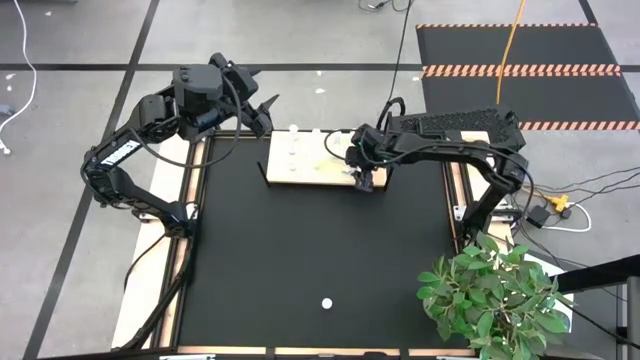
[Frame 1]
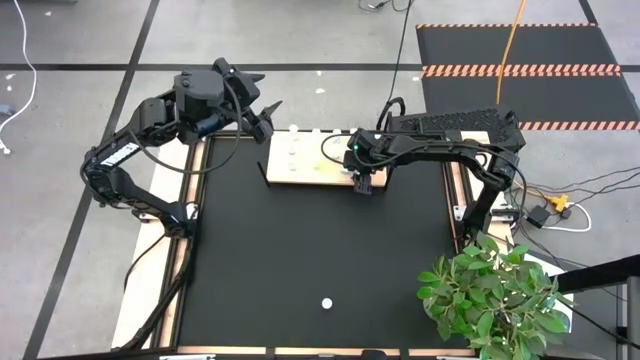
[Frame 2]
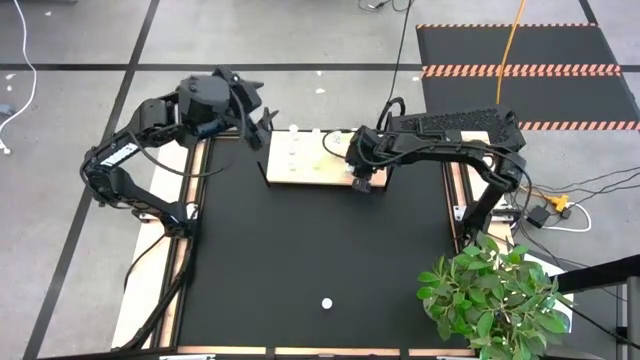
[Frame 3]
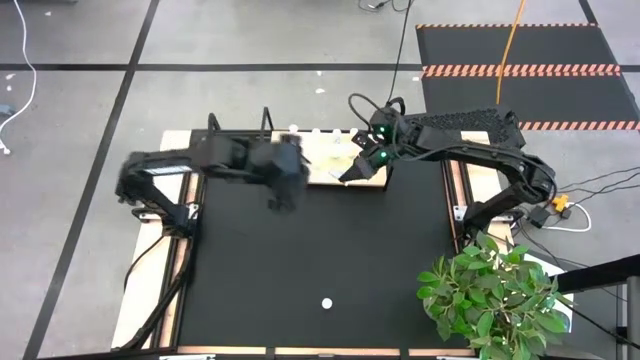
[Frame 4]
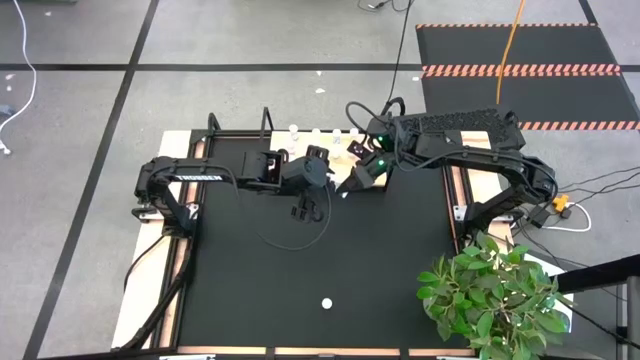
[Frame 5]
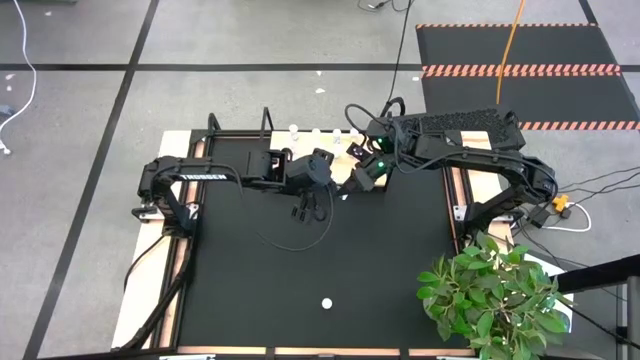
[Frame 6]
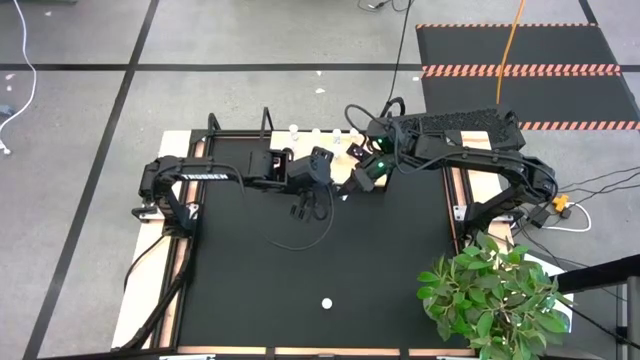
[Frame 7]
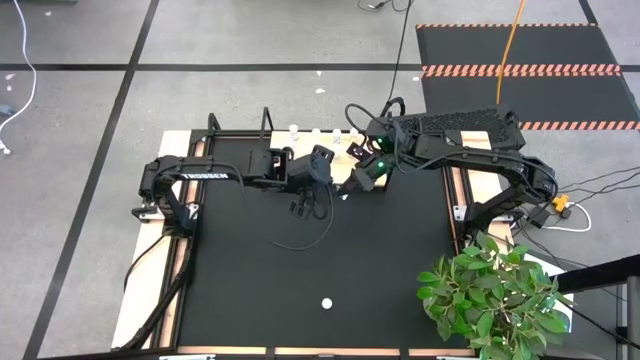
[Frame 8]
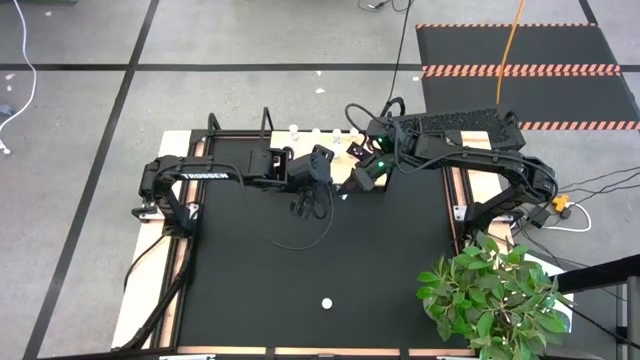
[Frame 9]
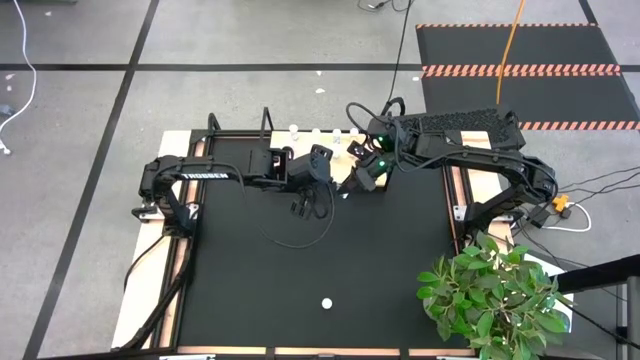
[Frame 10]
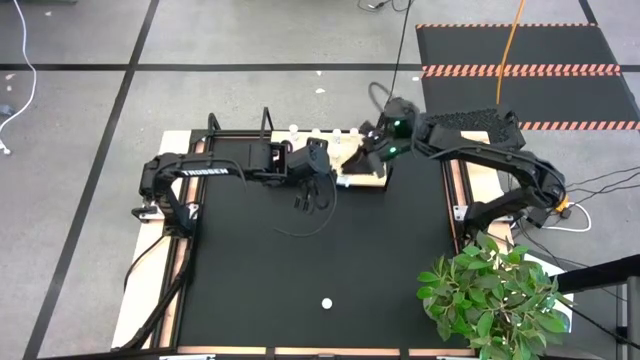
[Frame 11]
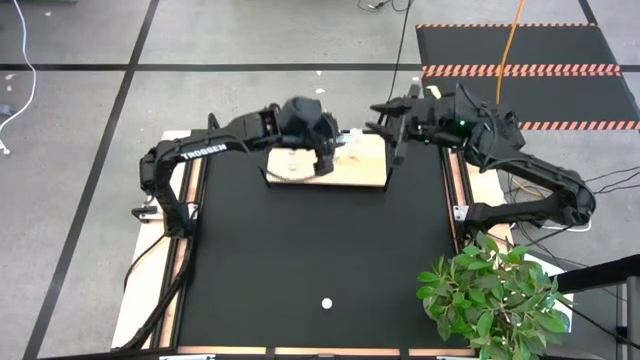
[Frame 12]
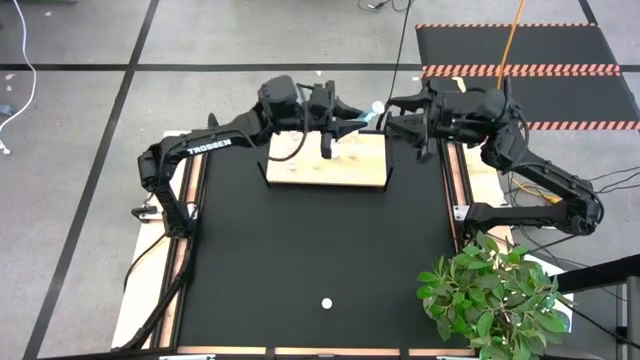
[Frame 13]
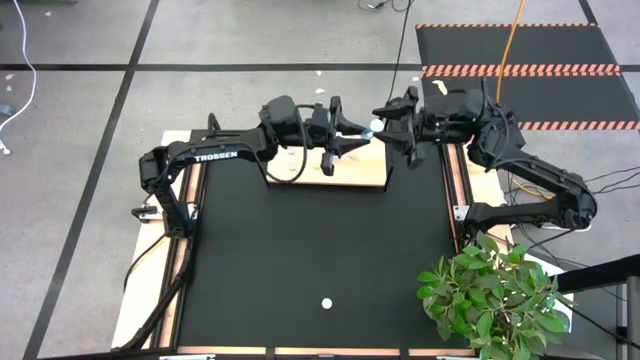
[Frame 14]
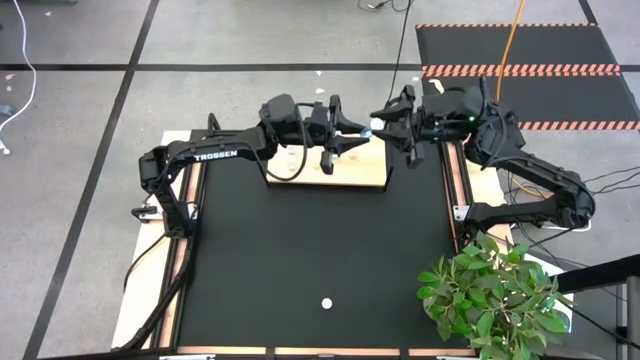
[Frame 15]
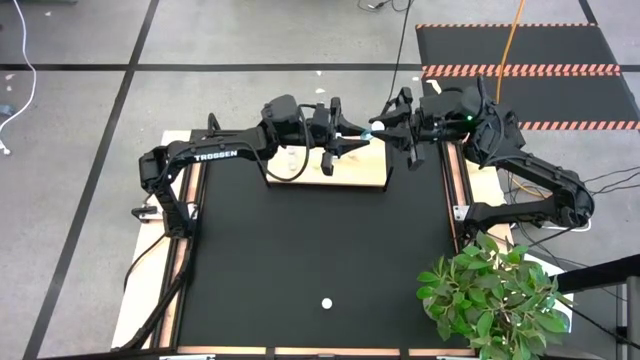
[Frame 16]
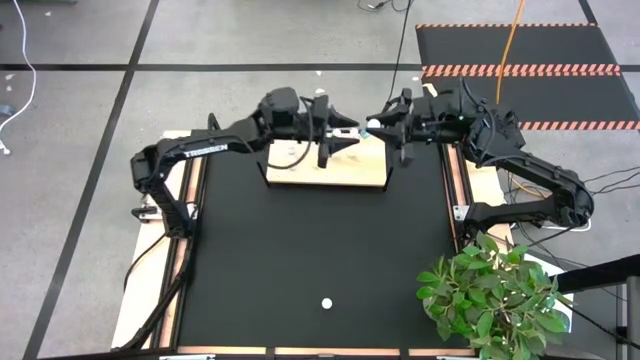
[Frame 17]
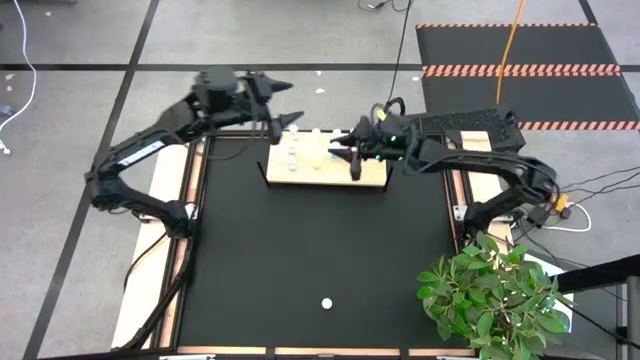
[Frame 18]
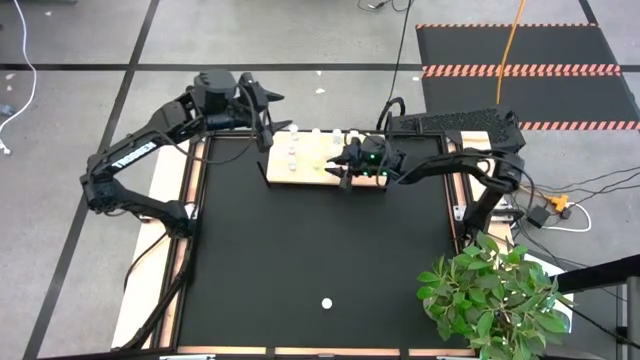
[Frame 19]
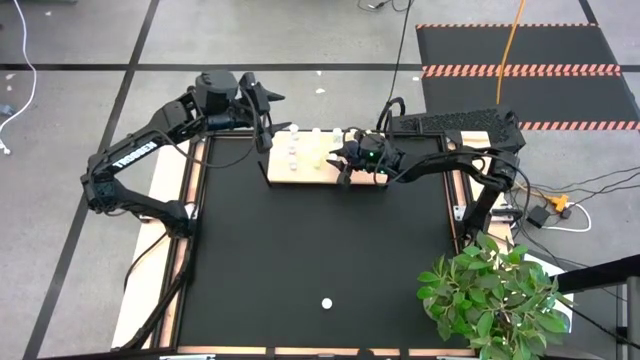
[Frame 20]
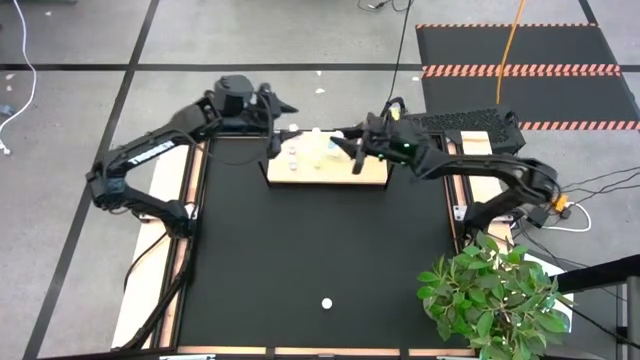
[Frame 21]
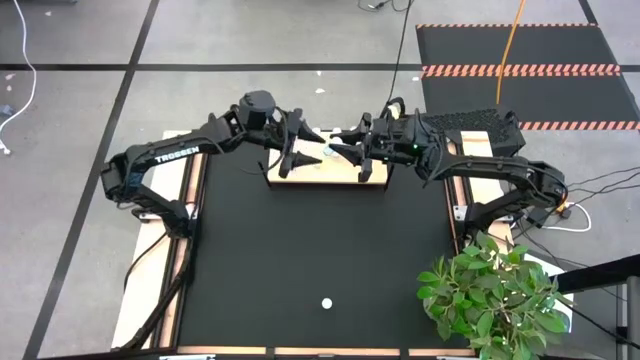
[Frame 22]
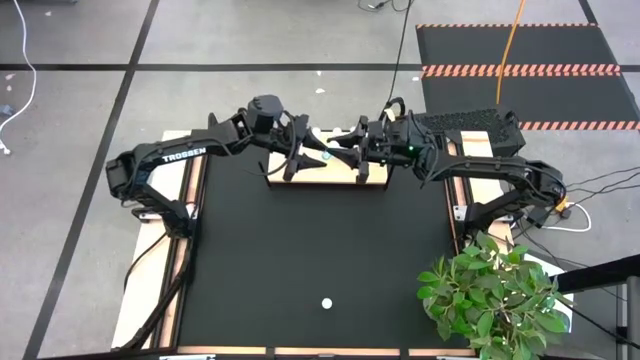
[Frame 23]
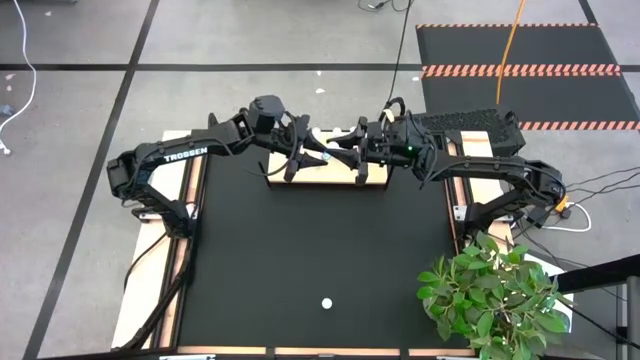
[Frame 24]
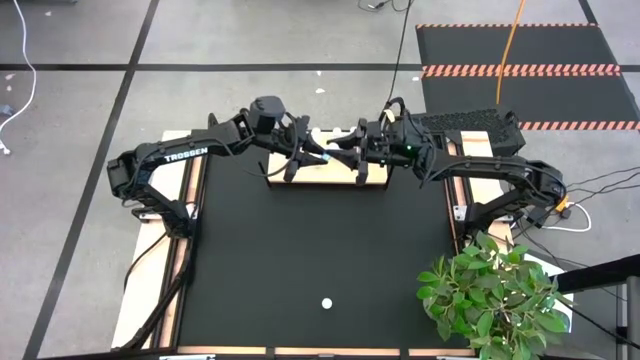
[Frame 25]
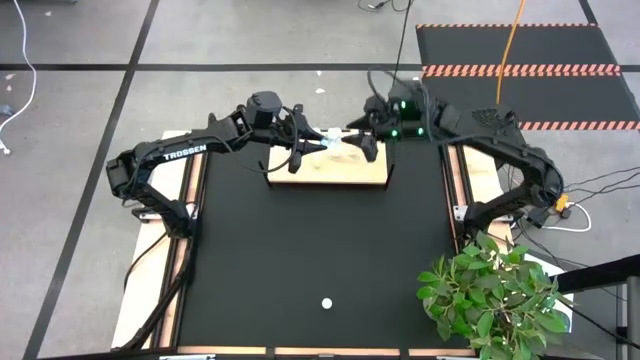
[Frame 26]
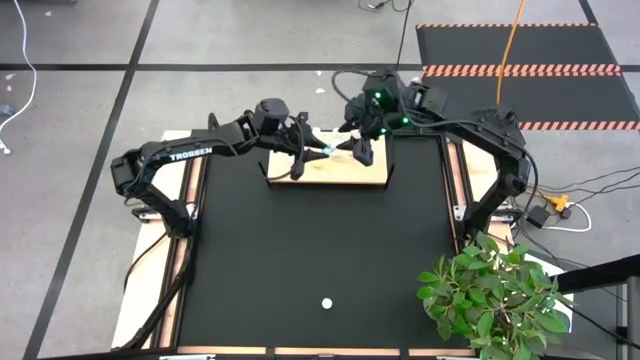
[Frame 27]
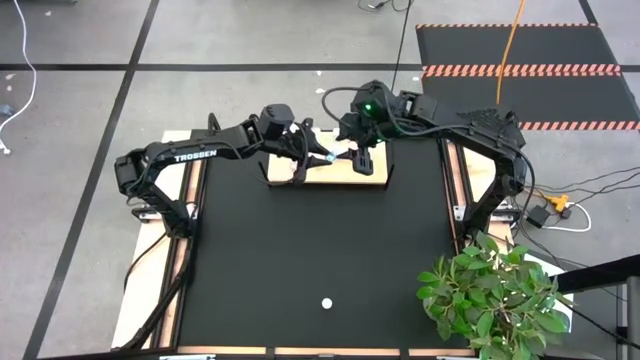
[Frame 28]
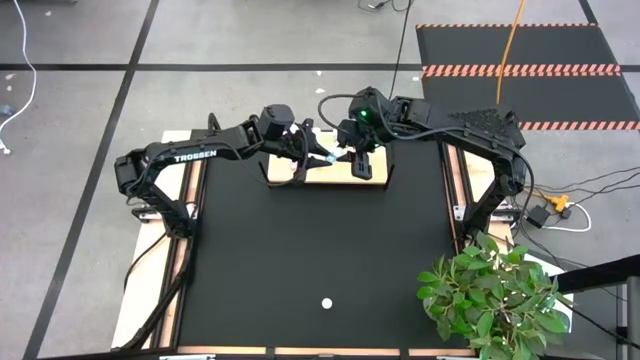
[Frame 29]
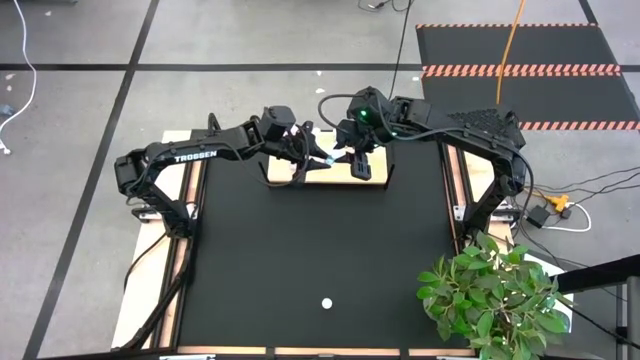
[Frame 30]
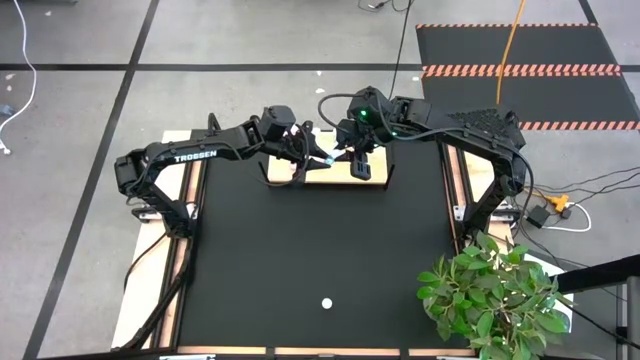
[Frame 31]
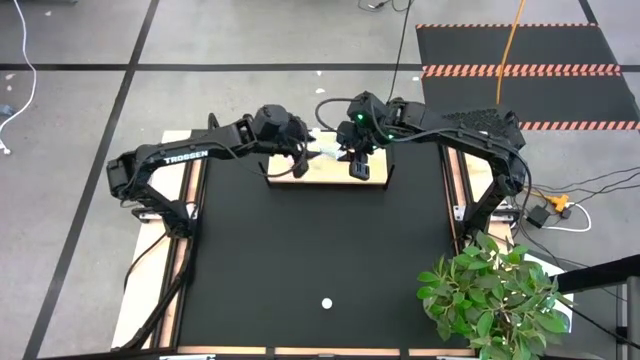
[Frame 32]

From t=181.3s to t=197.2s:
Task: Pick and place medicine bottles onto shelf by color
Put the blue pill bottle on the shelf aligned with the other blue pill bottles

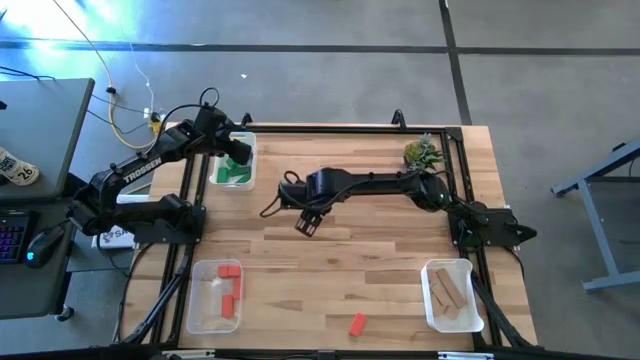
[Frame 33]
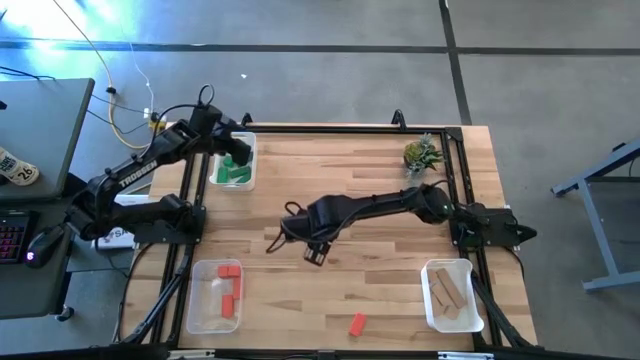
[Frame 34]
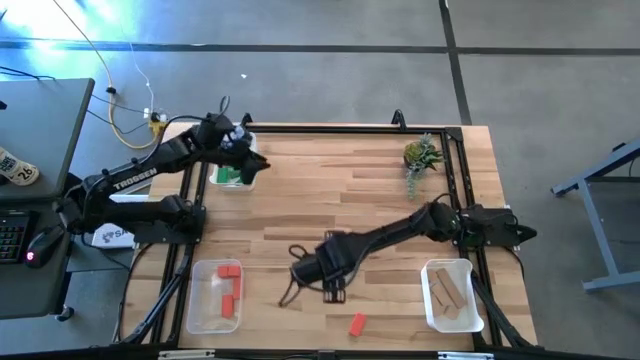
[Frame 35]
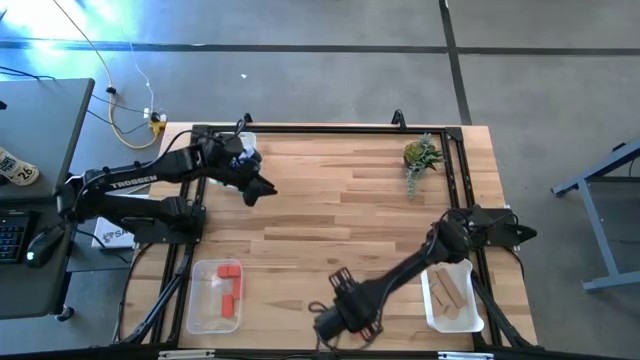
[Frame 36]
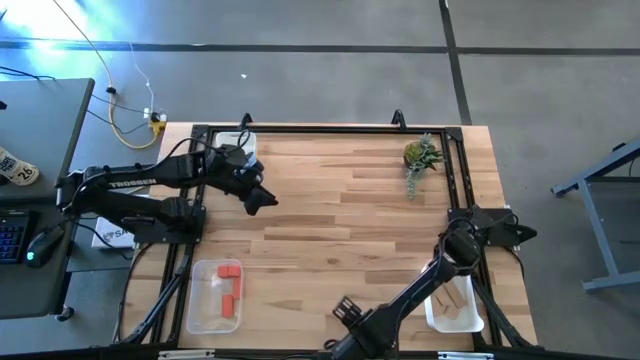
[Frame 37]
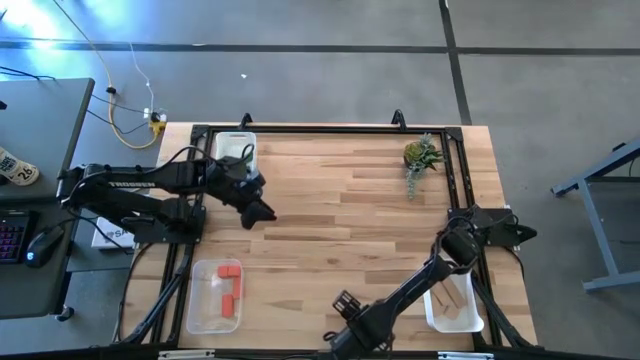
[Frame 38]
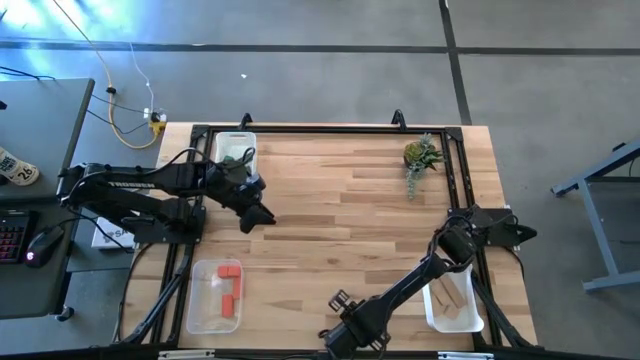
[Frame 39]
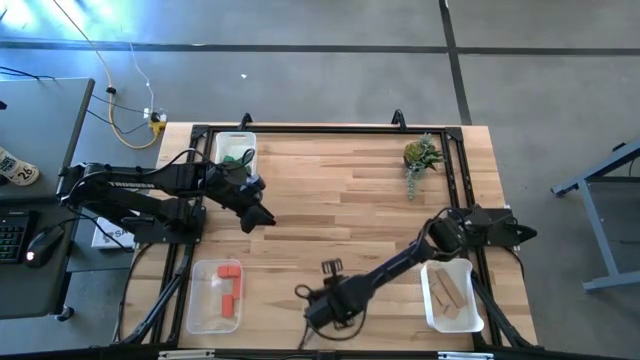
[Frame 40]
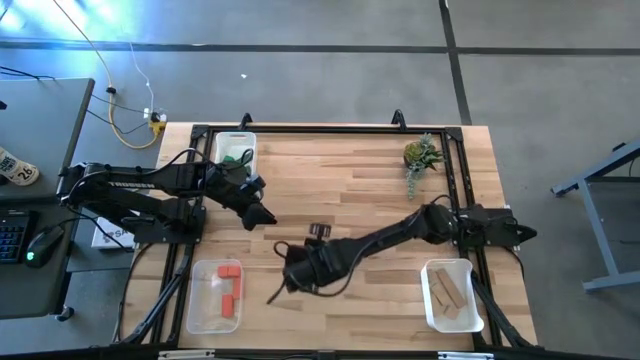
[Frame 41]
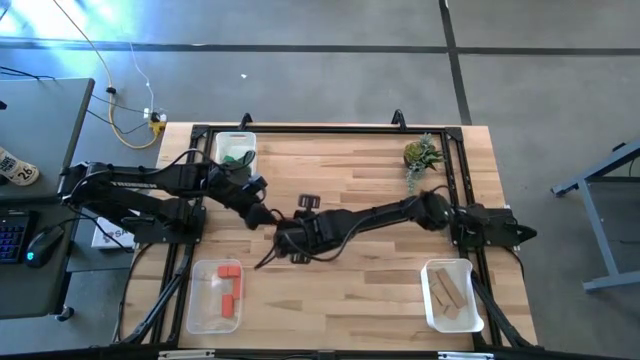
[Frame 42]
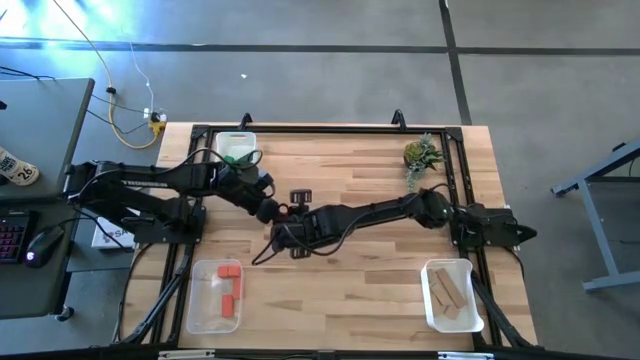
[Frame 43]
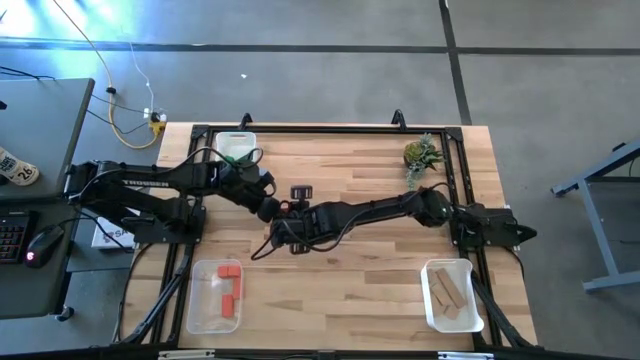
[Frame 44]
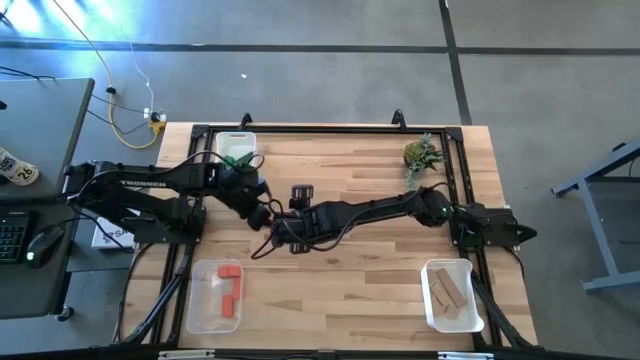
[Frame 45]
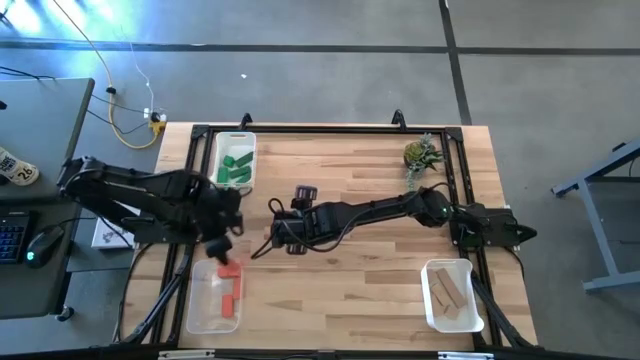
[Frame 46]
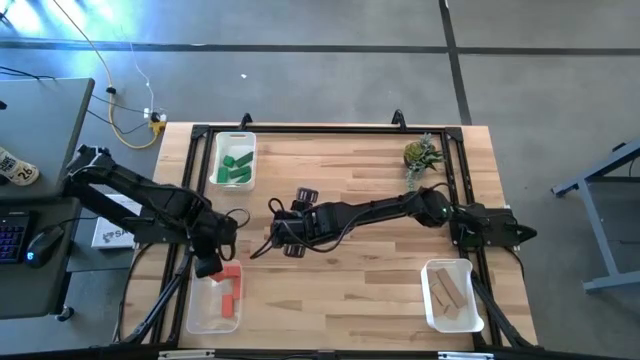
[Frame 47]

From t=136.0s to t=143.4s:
Task: Sort & place blocks by color
Put the orange block into the transparent bin
